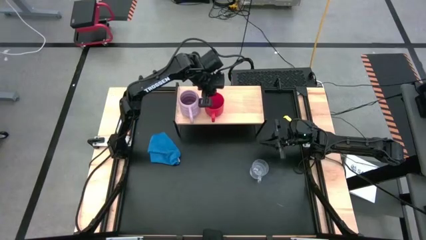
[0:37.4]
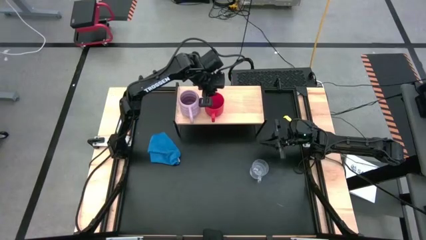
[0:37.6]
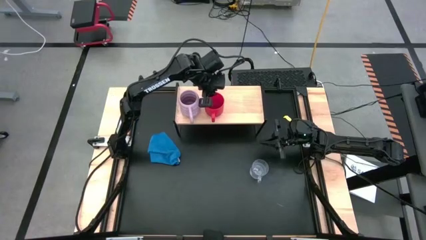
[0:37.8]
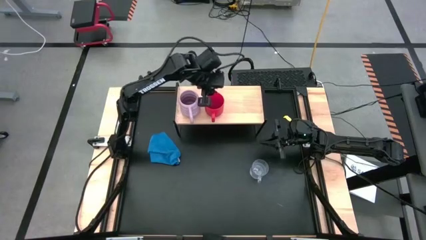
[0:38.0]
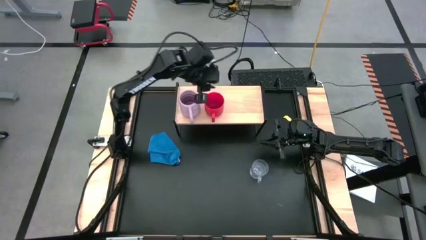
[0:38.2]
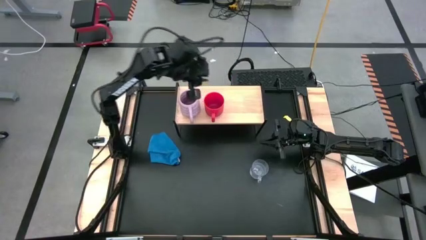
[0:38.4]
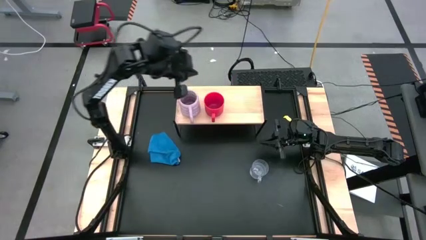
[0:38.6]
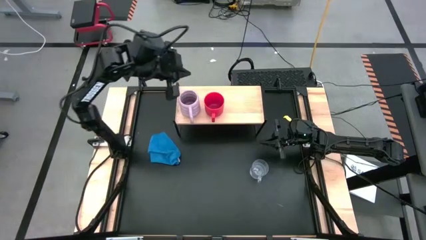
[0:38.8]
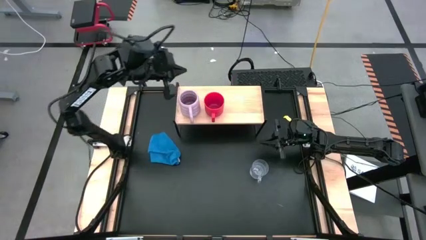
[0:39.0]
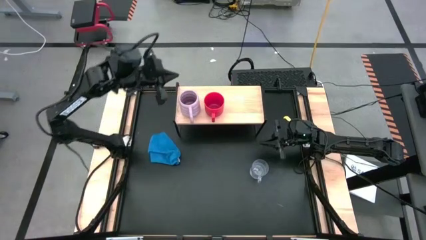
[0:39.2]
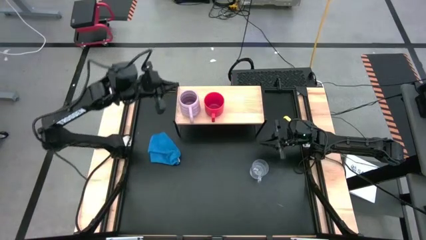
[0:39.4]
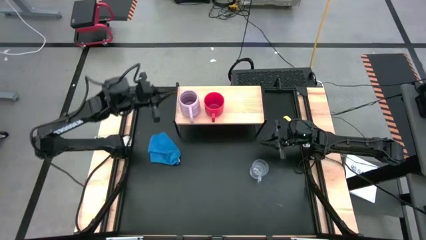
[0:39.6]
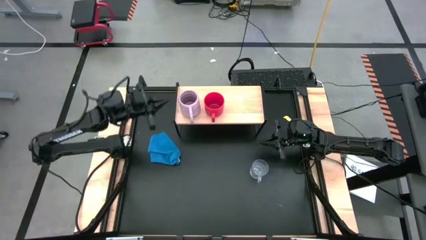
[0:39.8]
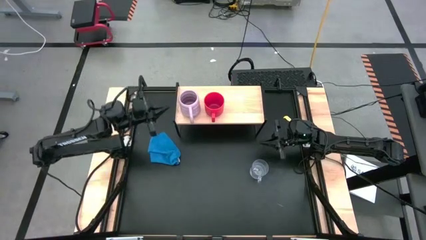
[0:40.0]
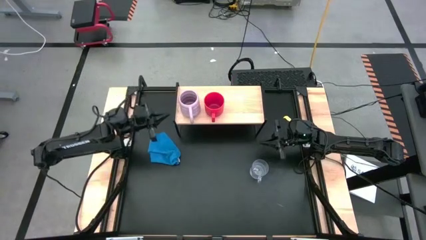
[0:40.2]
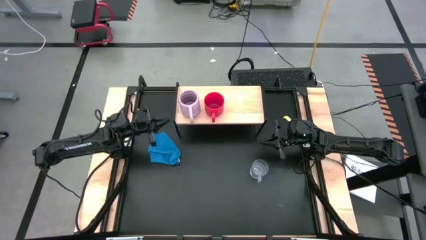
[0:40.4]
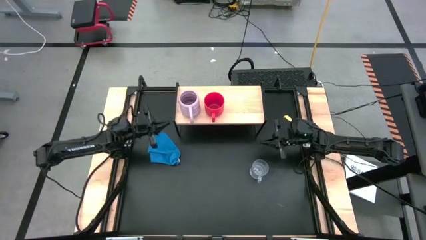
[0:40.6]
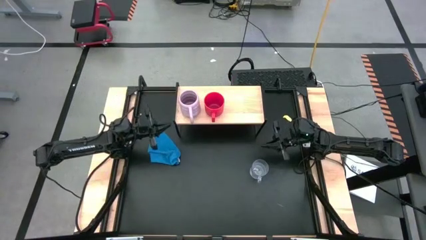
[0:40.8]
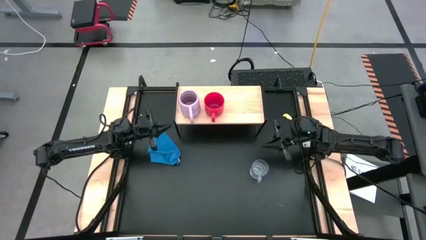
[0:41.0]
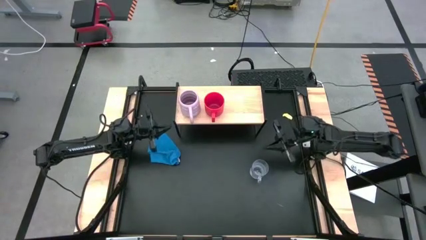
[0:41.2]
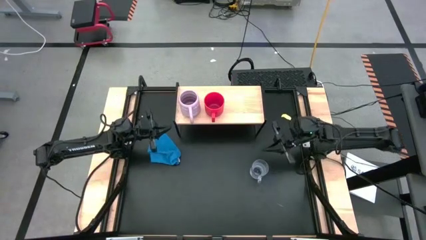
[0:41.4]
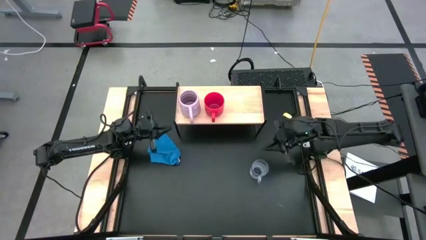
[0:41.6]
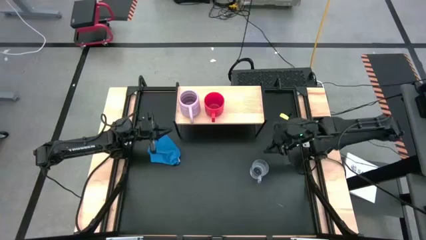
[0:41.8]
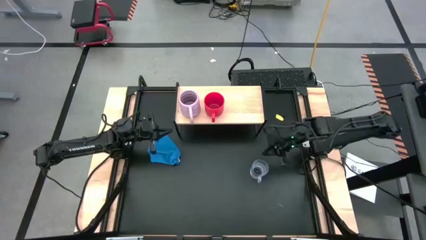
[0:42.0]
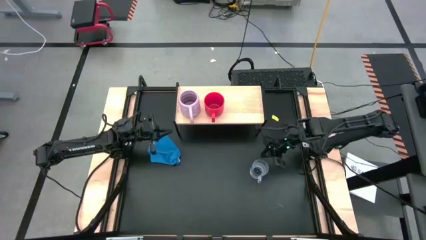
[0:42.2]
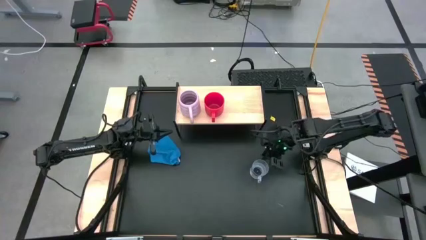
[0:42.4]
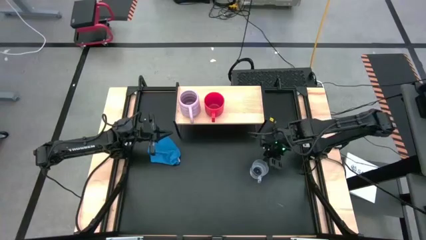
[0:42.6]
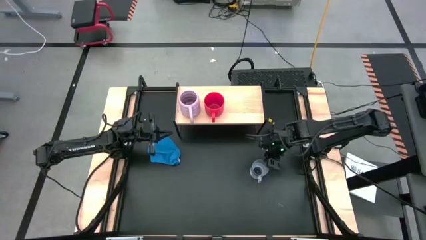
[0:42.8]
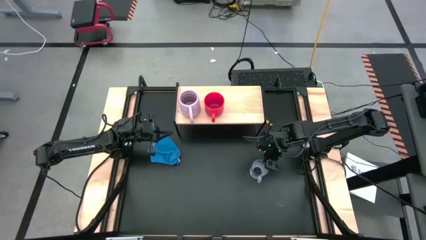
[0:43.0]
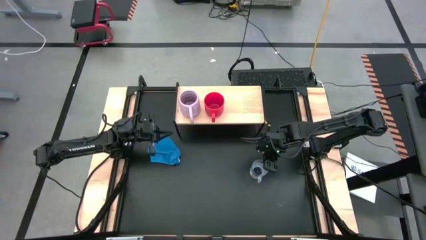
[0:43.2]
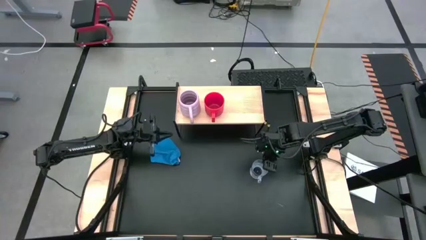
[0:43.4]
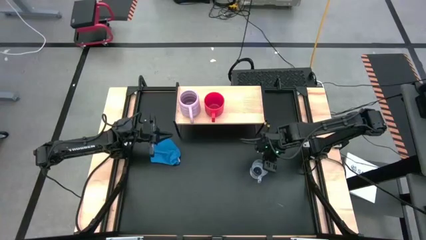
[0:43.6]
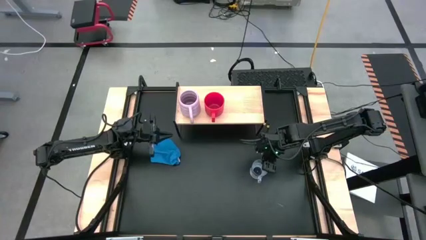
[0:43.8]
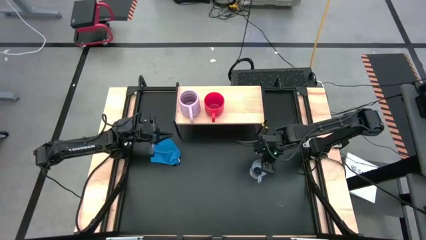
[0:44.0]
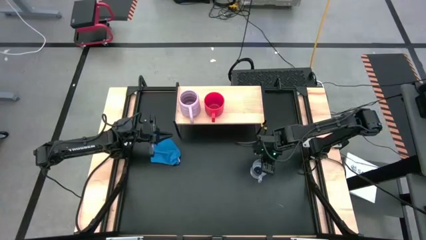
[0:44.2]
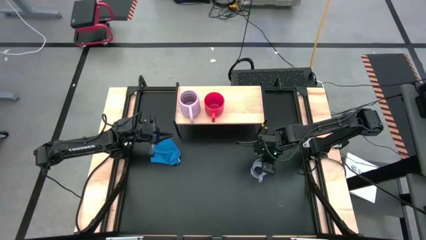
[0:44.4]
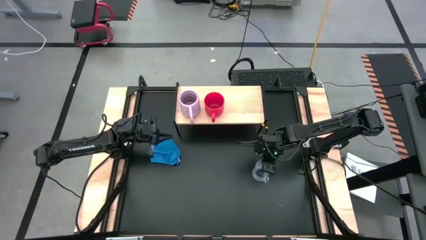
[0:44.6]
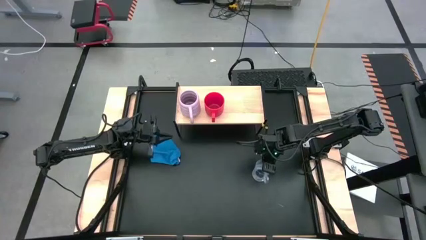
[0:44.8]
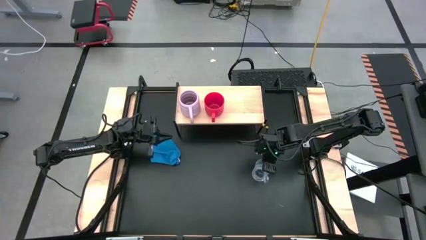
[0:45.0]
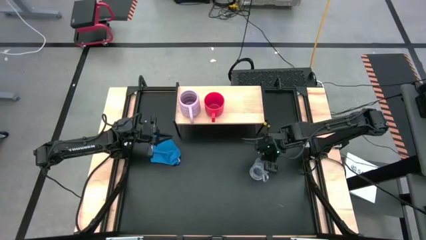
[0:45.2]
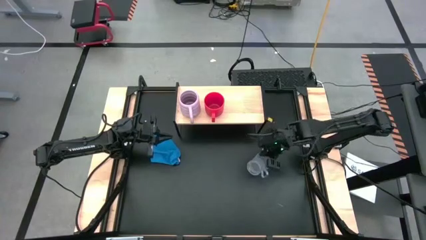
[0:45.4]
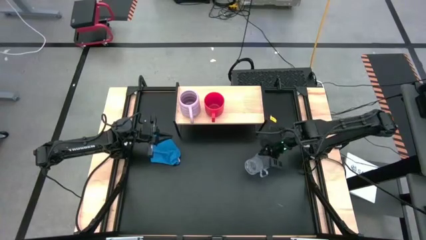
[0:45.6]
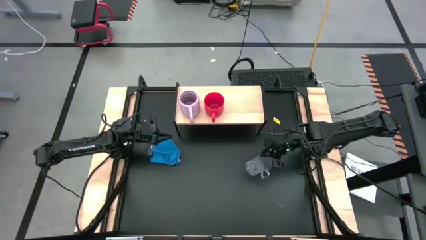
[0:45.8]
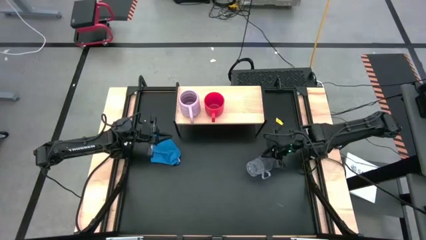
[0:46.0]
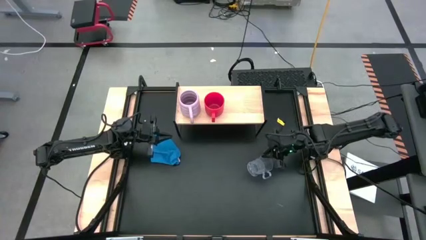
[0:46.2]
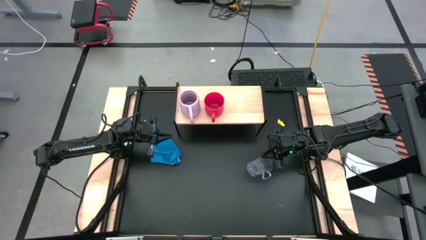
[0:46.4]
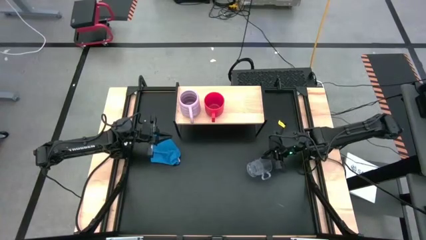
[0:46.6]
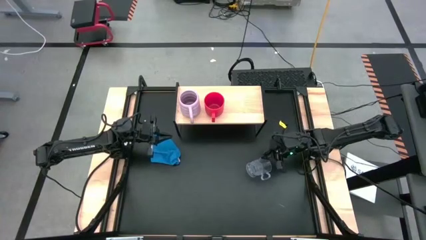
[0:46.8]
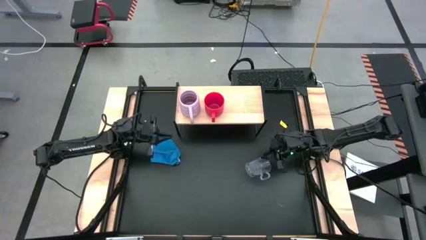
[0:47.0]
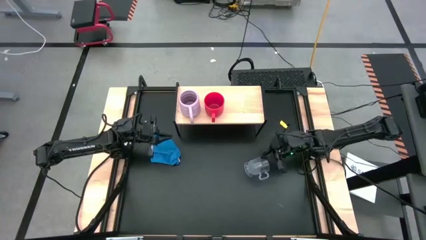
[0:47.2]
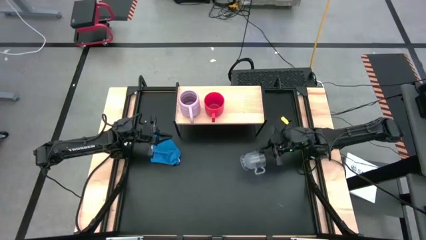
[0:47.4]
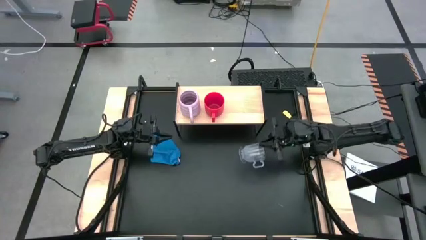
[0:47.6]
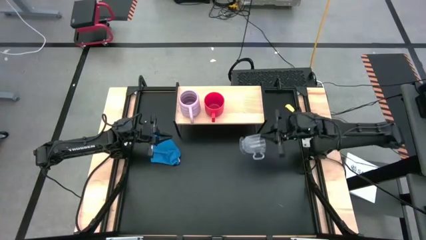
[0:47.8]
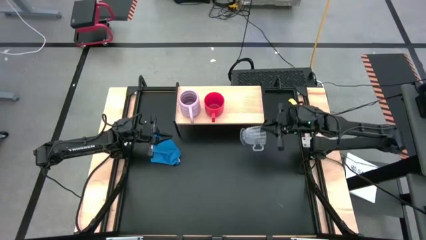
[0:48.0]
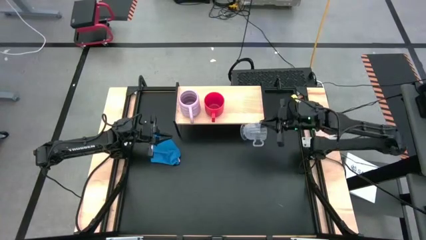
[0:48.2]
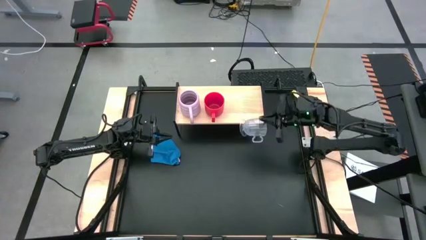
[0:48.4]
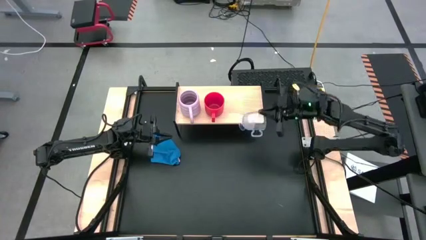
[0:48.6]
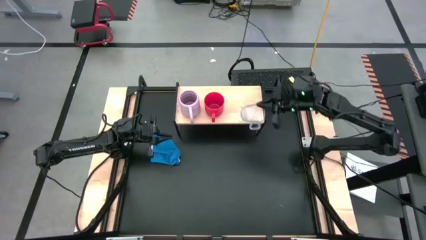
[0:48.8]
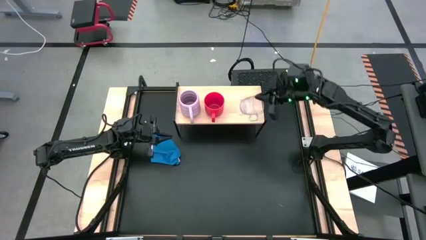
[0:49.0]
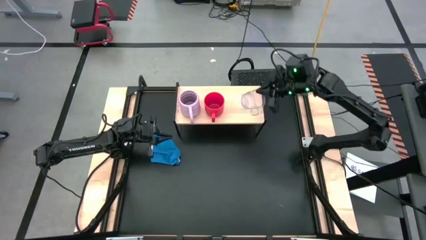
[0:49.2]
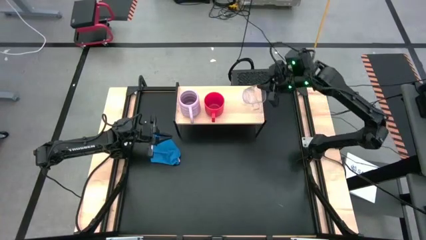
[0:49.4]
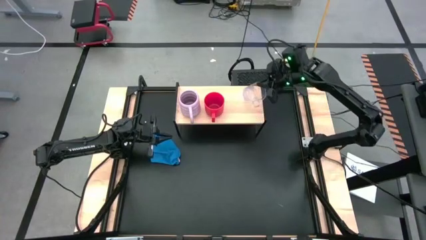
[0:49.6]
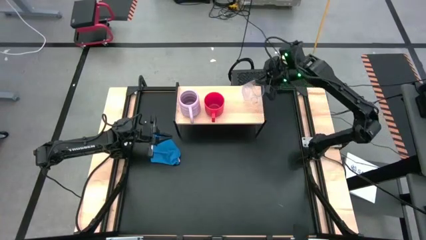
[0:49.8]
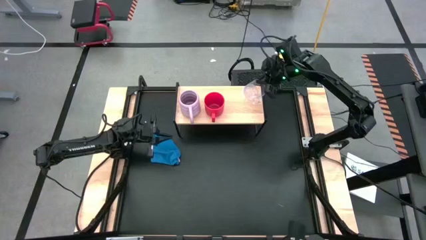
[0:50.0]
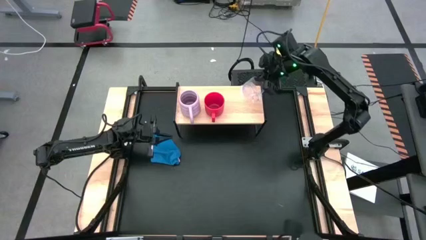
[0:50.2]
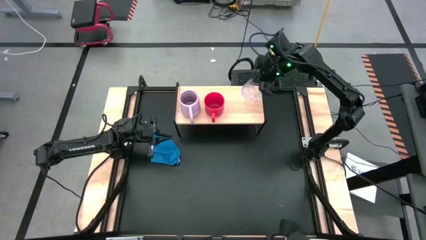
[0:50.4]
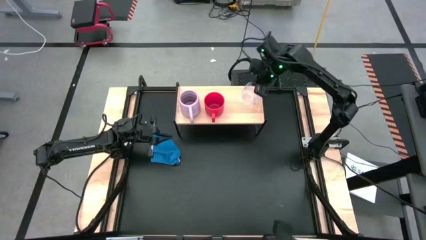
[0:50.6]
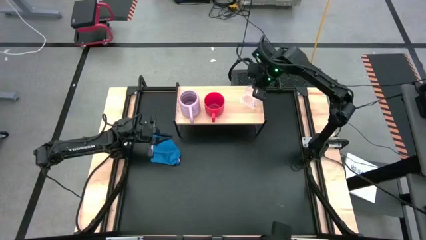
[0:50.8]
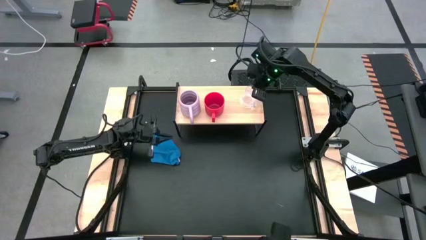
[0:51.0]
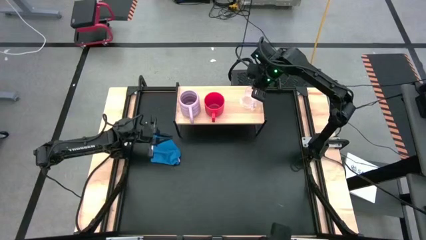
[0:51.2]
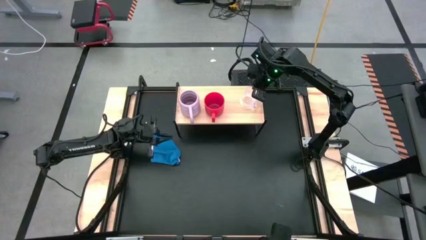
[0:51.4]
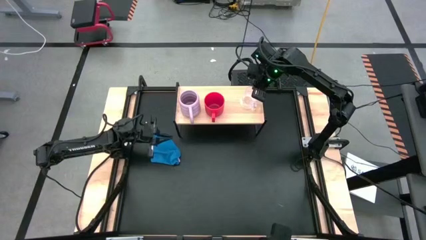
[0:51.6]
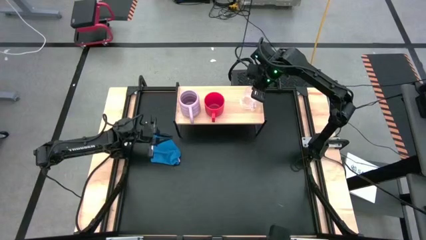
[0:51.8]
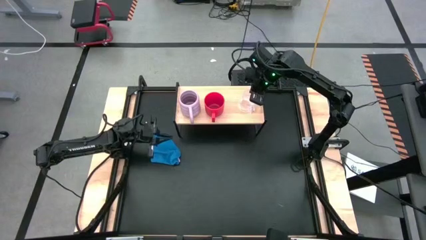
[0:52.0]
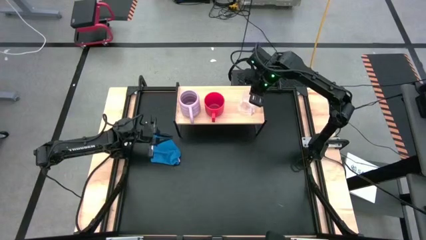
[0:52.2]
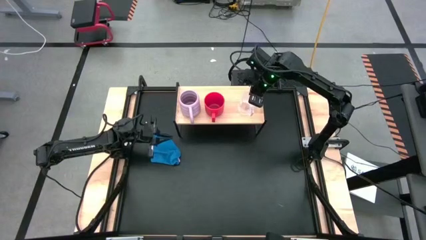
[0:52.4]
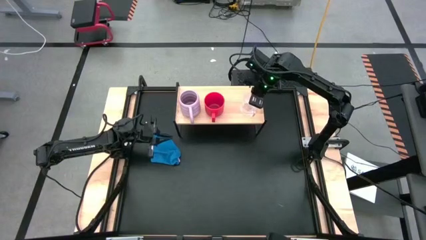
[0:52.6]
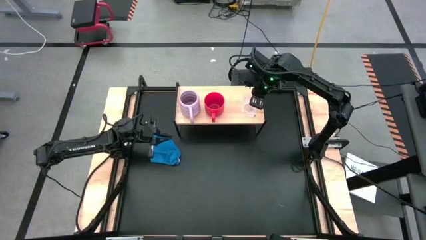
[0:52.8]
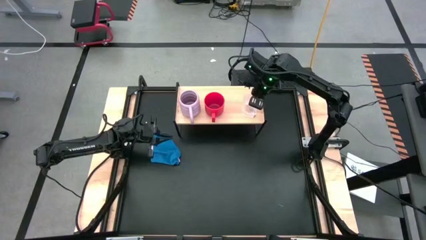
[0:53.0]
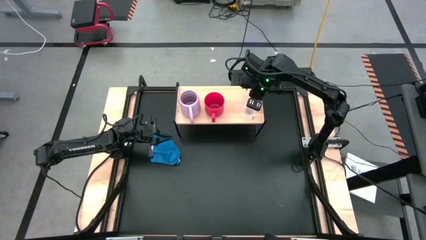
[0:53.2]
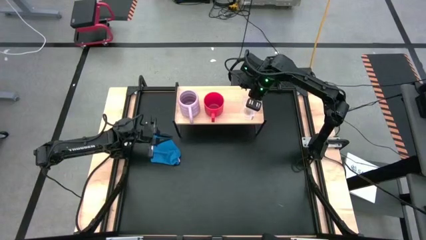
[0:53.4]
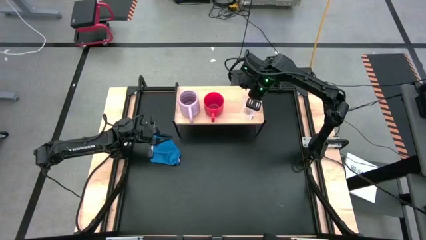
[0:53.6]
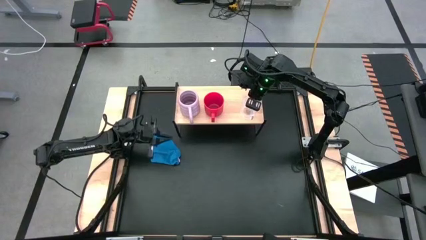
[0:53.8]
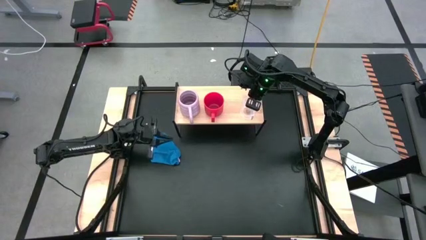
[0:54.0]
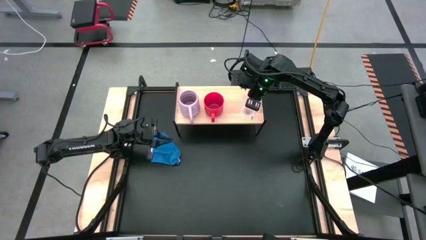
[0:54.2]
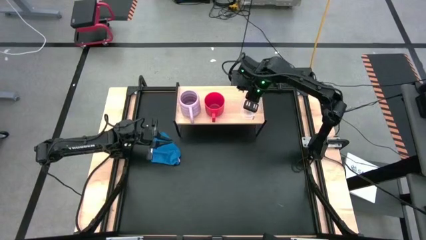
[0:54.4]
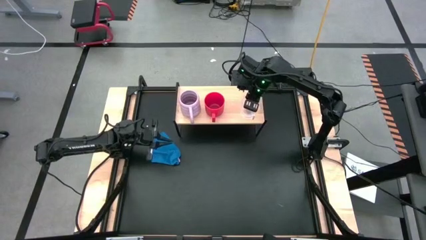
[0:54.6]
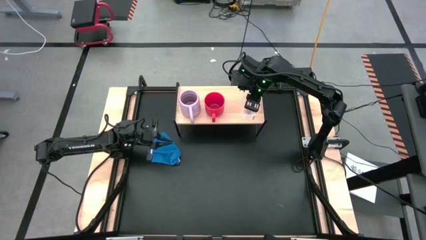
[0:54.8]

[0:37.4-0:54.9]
Task: Stack small to large cups/mugs on shelf
Put the transparent mug on the shelf
